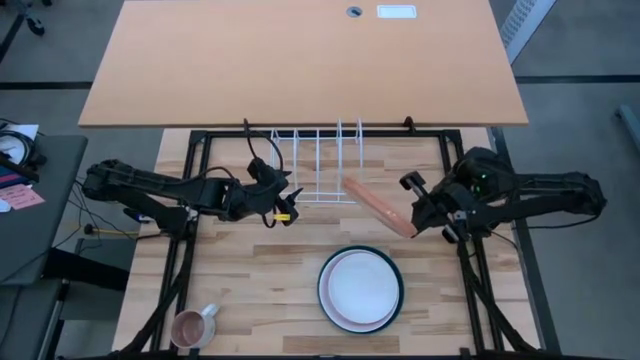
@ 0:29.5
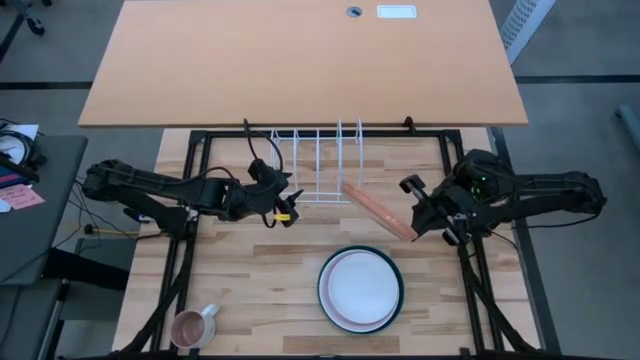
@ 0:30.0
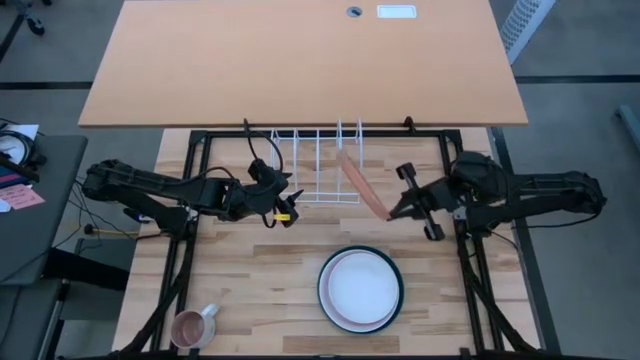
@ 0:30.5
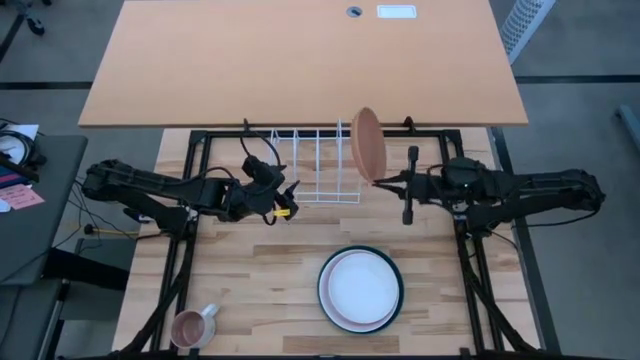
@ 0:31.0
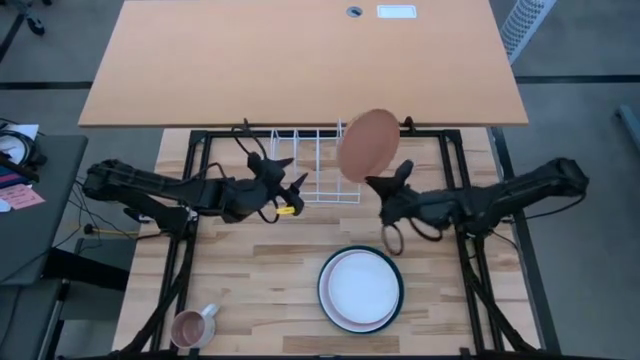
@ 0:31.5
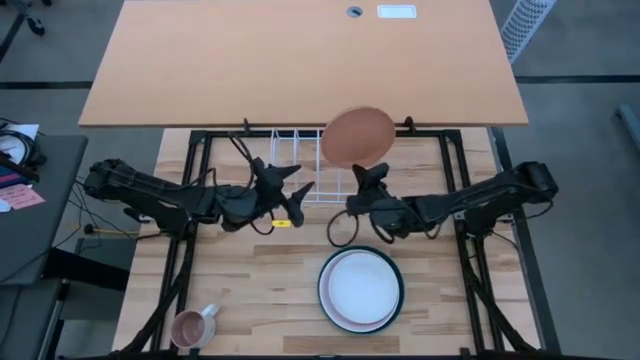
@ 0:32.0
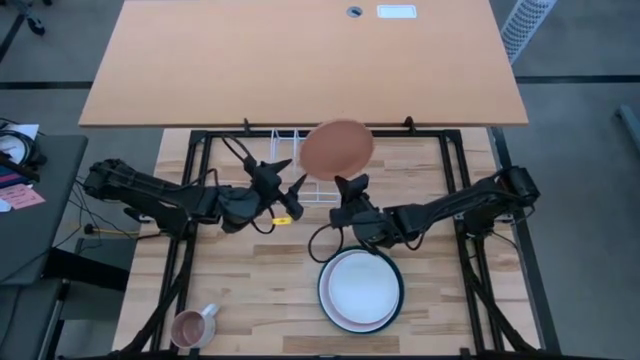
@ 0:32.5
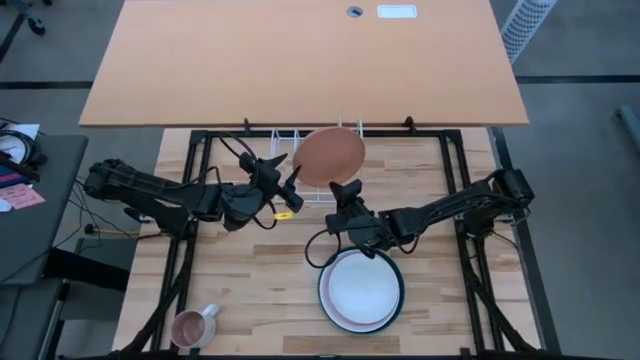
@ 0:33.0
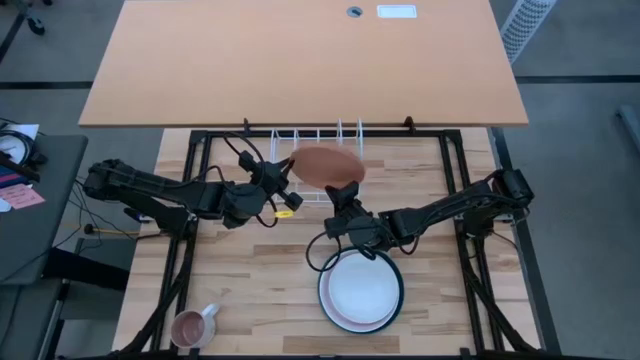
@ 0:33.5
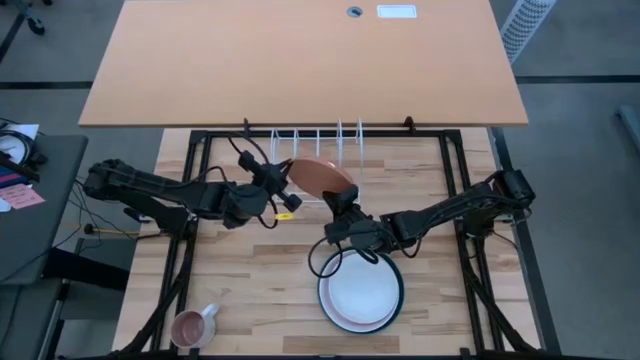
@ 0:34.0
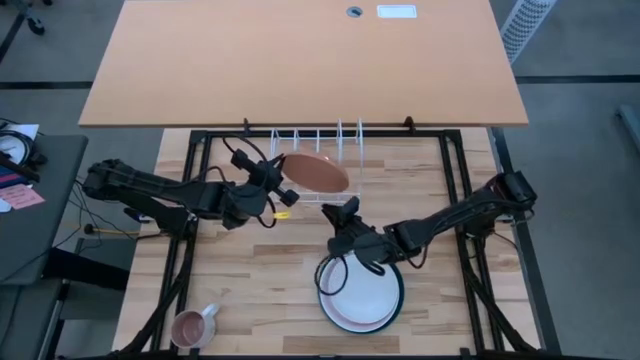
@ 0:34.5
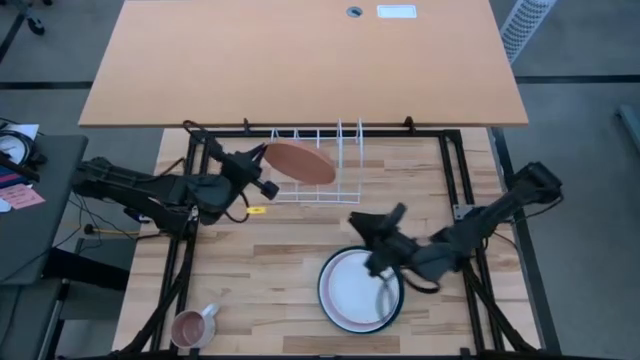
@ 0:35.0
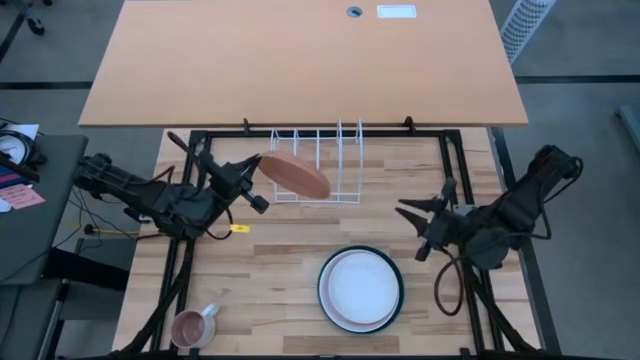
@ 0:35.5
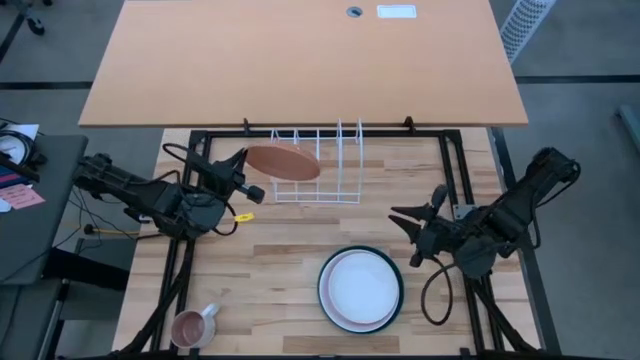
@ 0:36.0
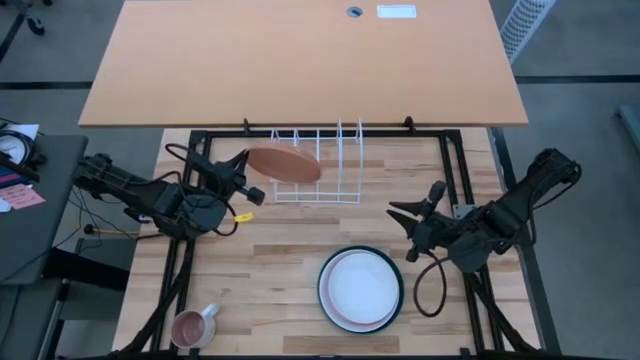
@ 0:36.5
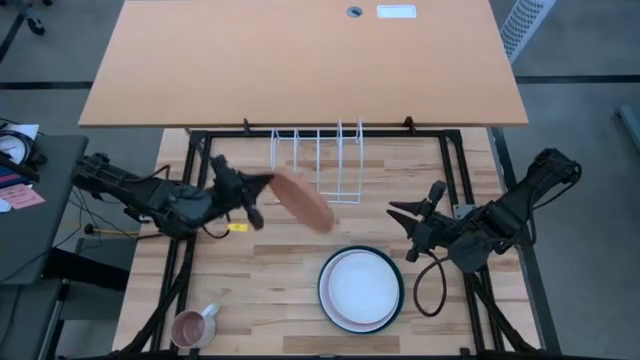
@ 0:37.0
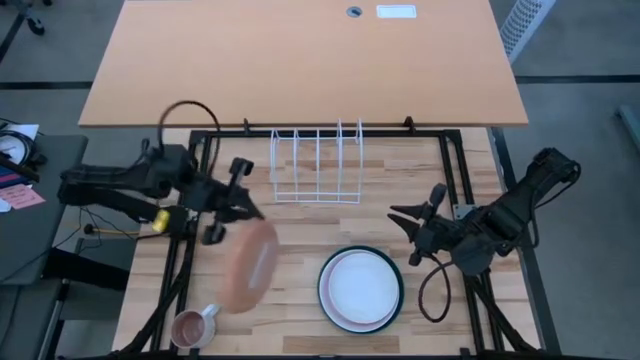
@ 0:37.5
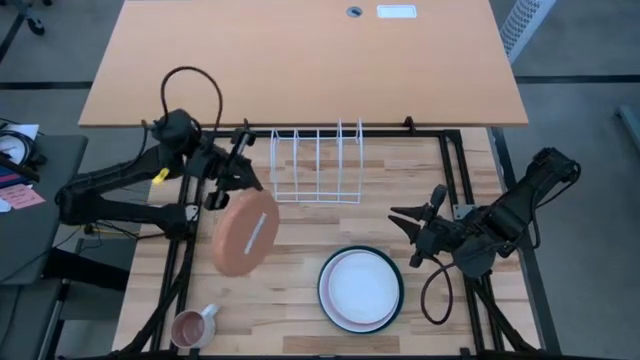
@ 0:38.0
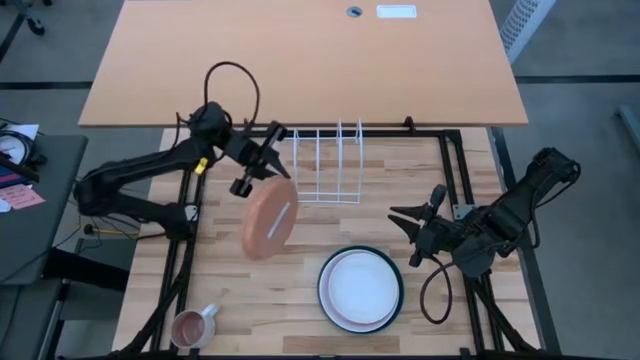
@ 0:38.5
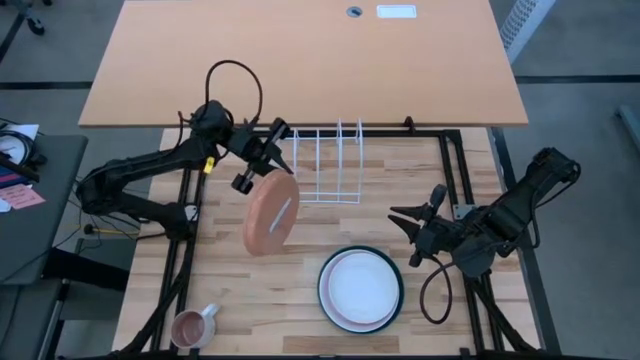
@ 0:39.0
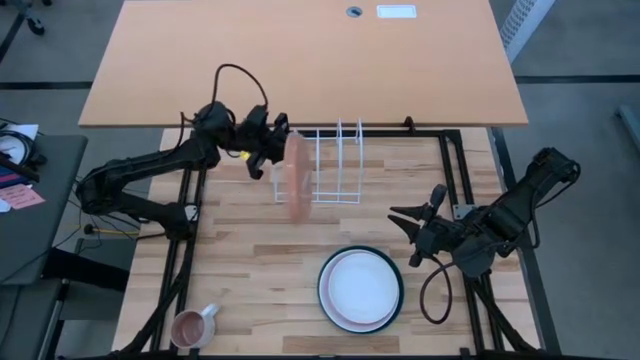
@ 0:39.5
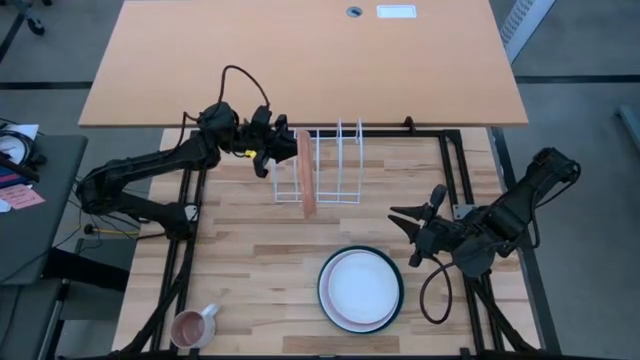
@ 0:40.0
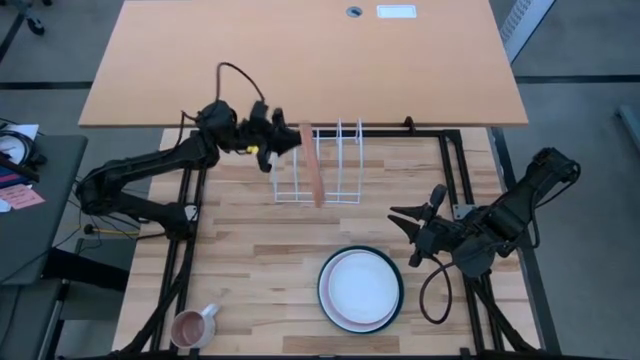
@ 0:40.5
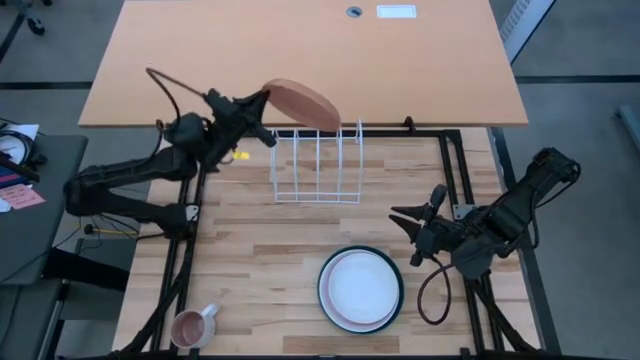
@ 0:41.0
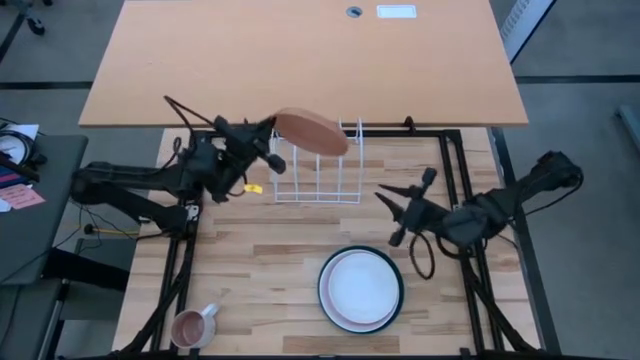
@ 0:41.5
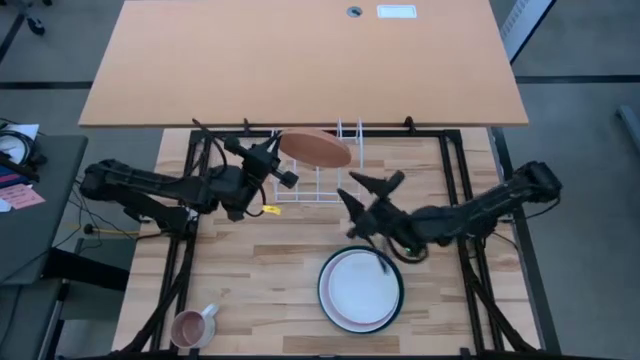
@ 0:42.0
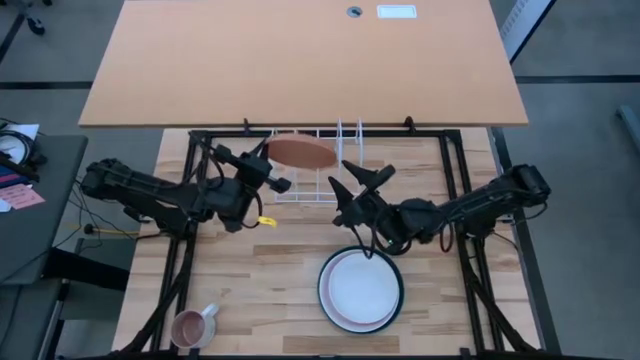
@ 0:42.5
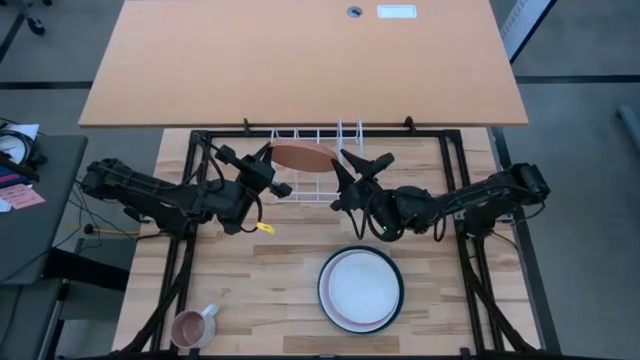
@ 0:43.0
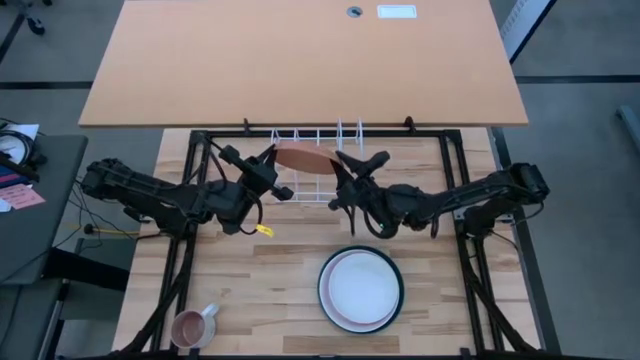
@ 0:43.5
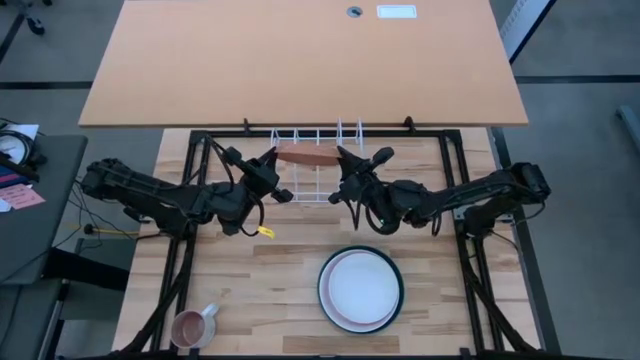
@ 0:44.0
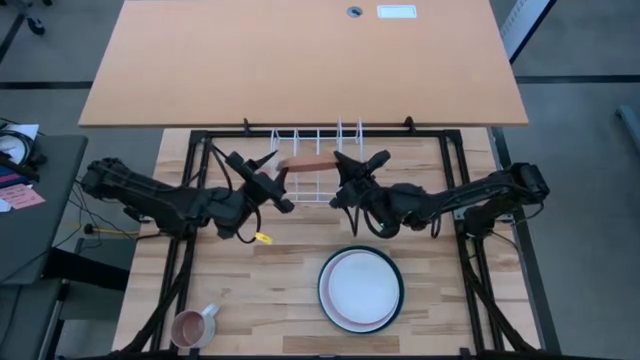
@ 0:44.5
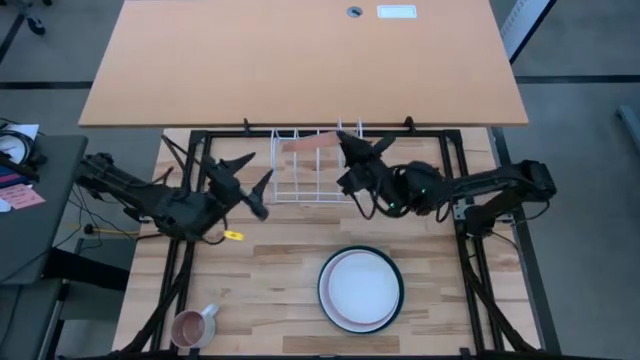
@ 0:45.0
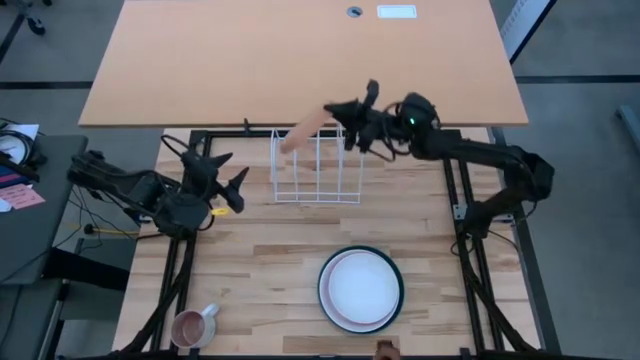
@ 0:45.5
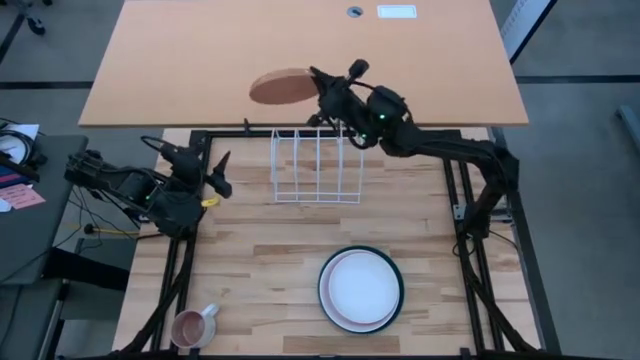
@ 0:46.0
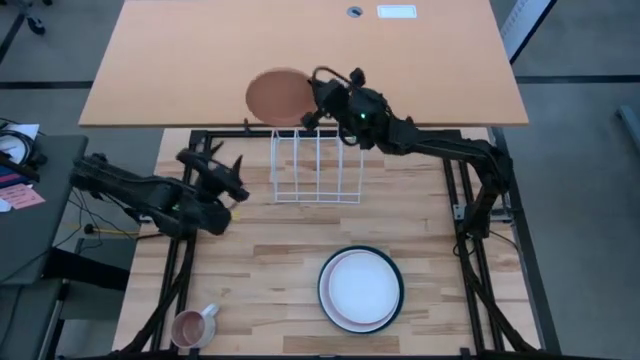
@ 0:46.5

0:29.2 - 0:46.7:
Task: Sort dishes
Put the light orange plate in the dish rack

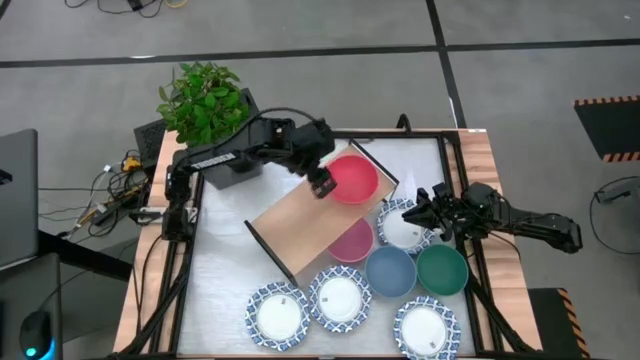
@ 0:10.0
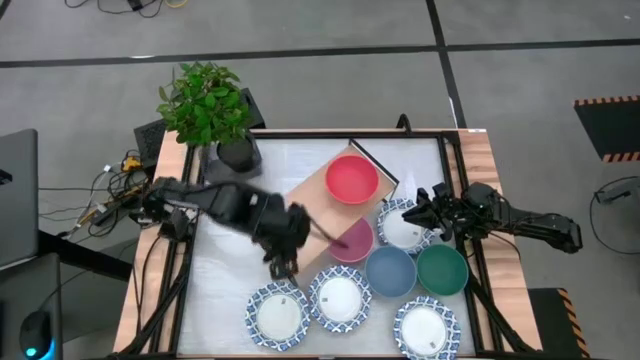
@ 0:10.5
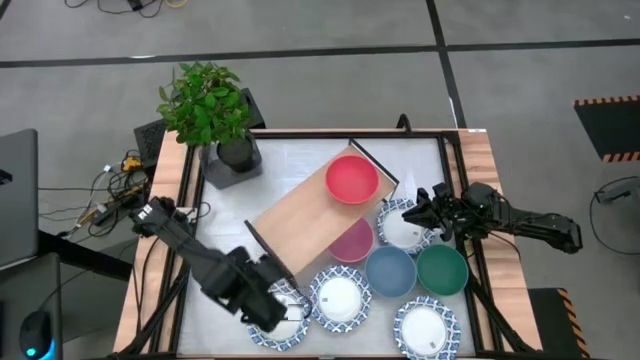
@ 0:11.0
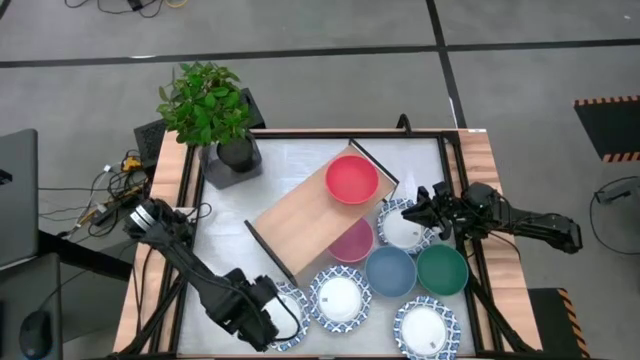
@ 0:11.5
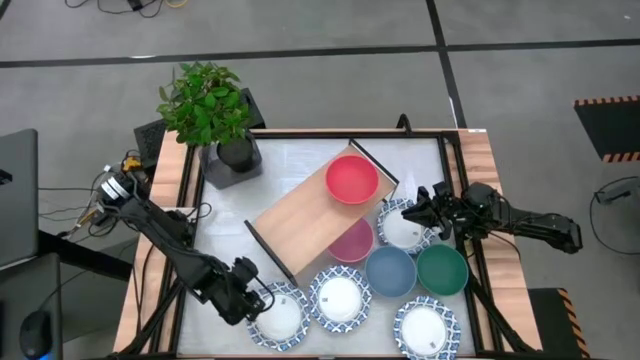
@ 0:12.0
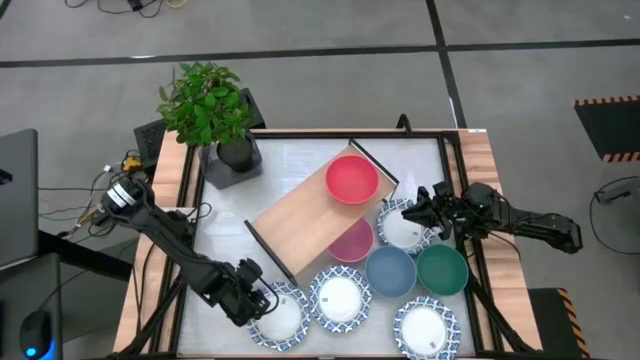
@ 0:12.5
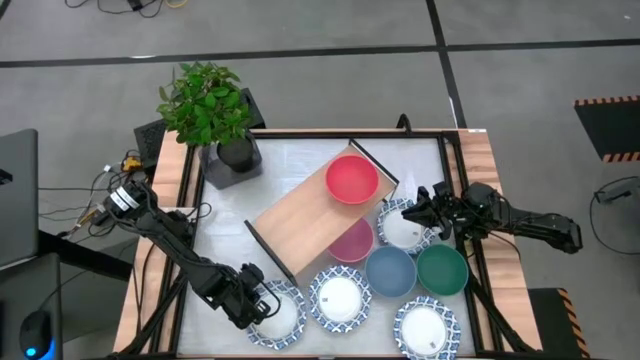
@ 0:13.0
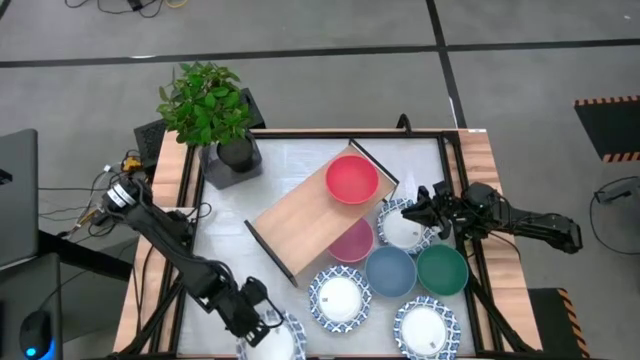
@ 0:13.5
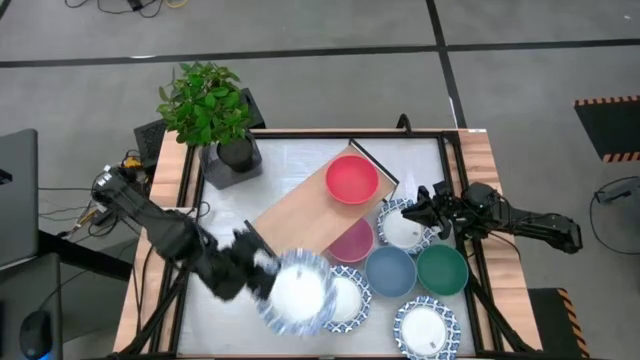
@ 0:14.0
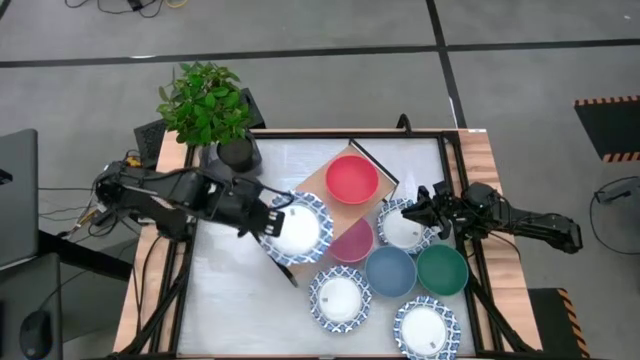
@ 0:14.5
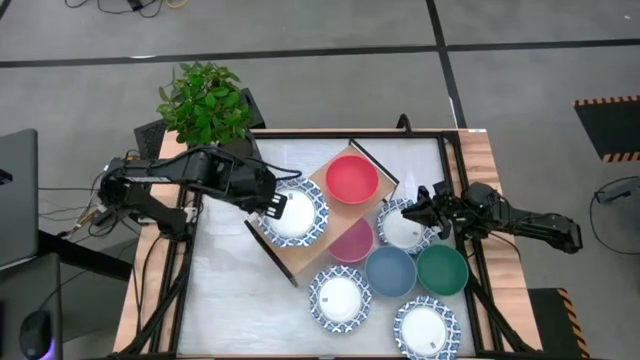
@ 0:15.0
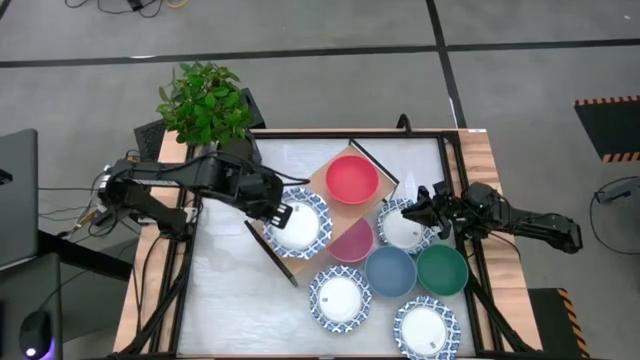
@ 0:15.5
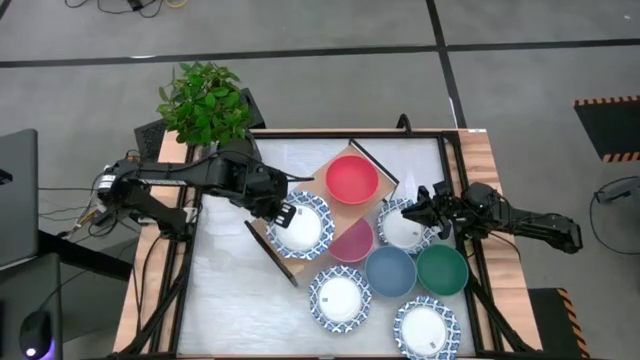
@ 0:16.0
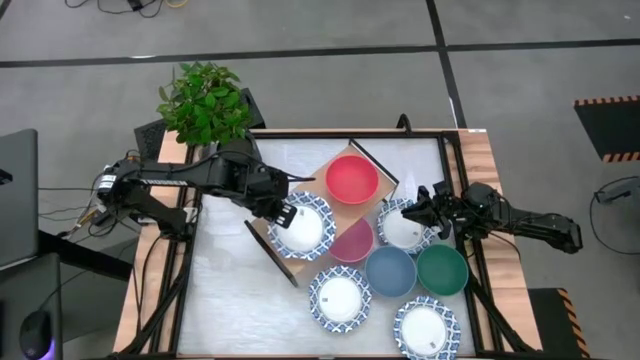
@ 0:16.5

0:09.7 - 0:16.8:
Task: Place and stack bowls onto a shelf
Put the white patterned bowl on the shelf
